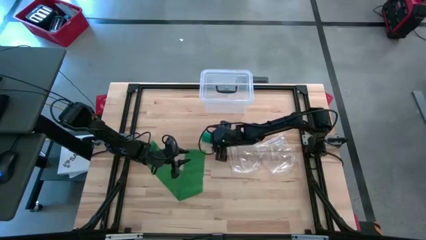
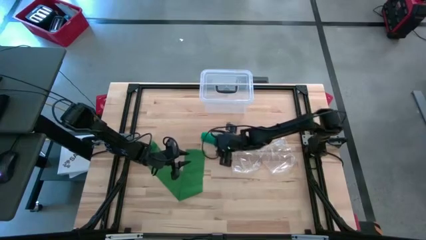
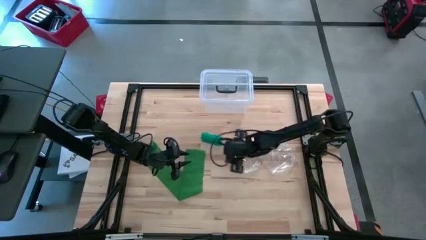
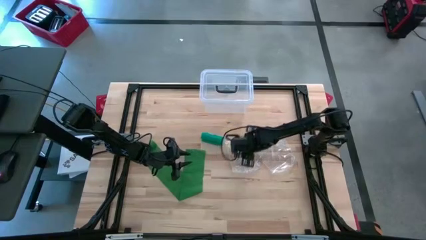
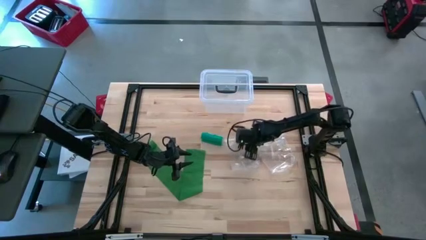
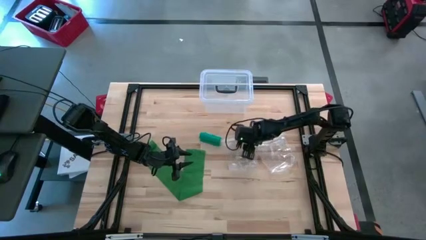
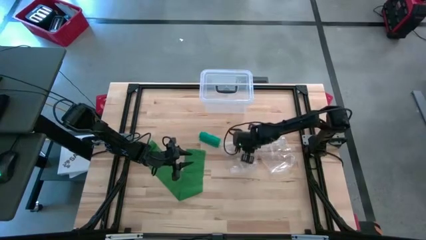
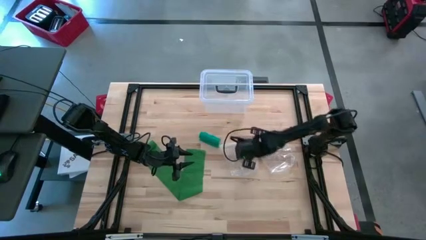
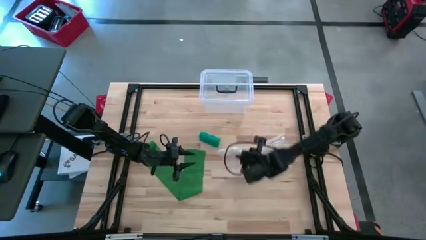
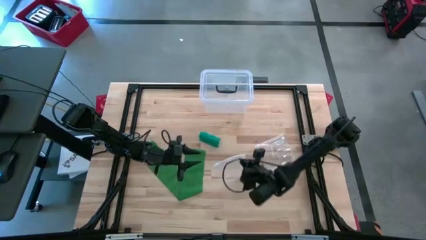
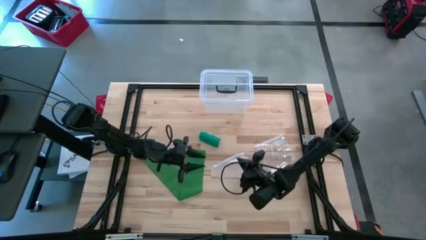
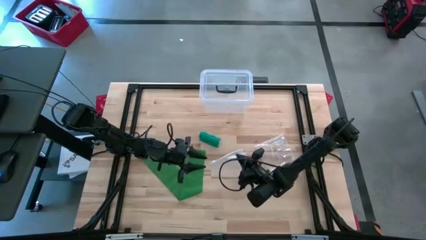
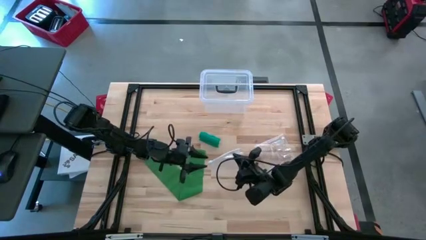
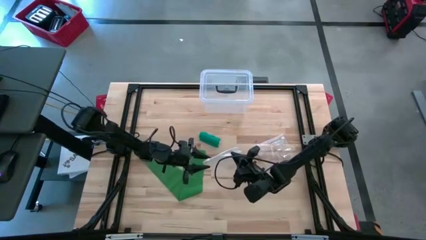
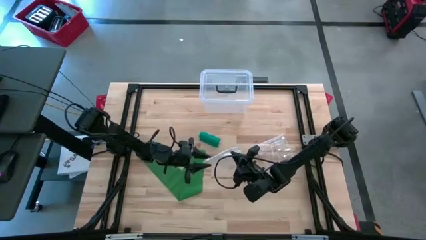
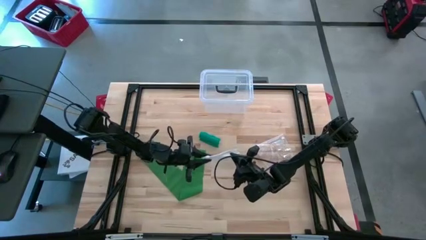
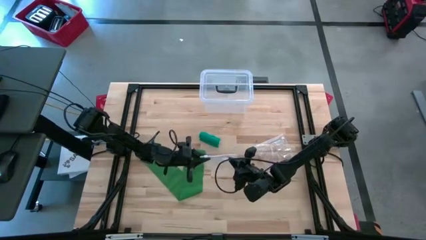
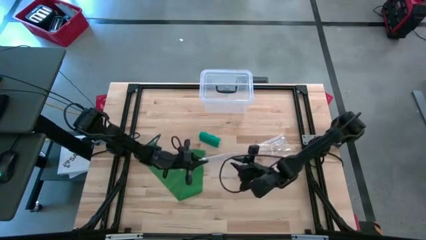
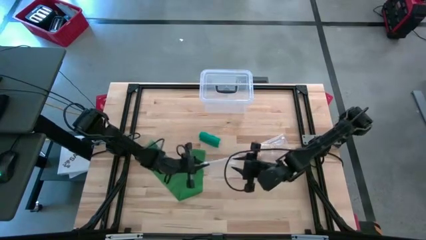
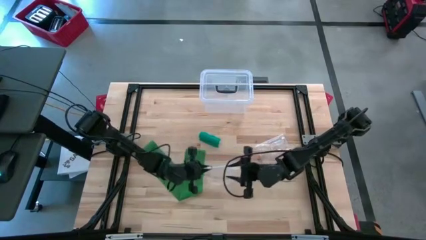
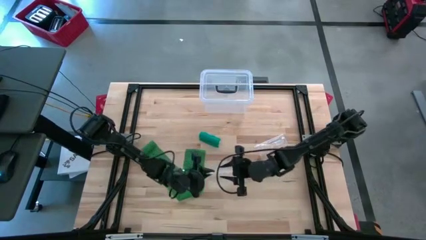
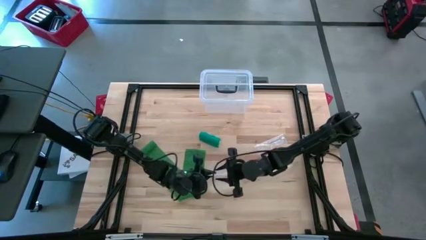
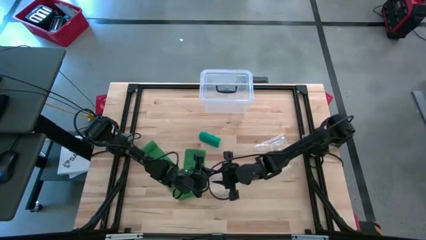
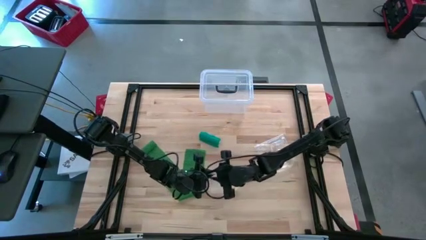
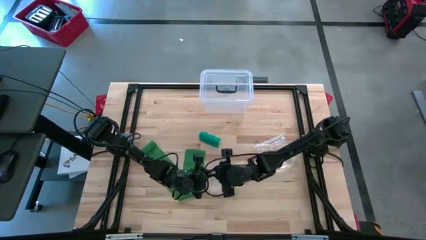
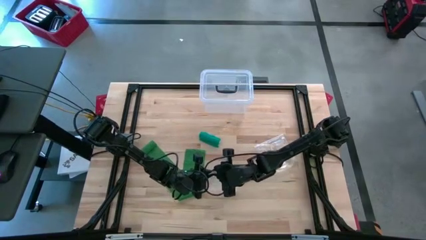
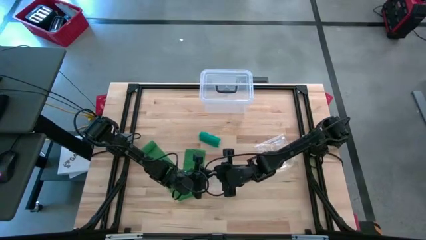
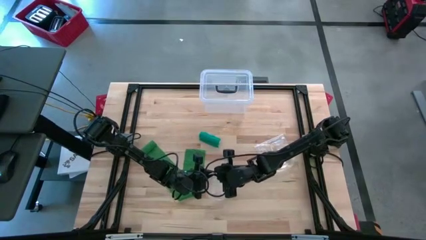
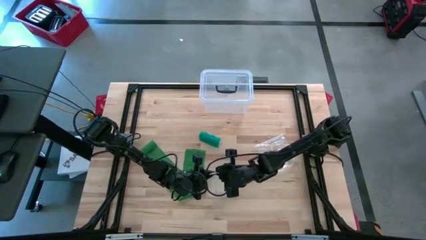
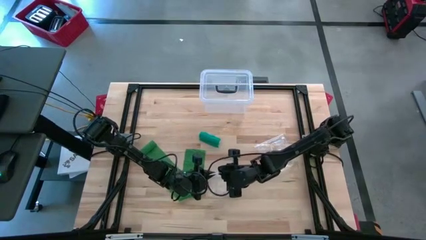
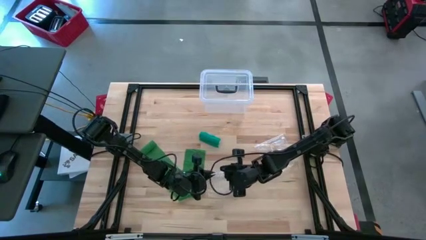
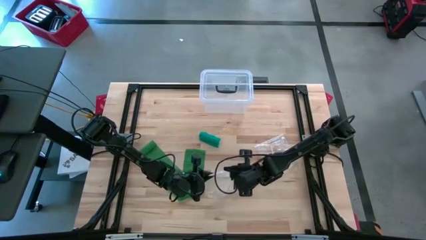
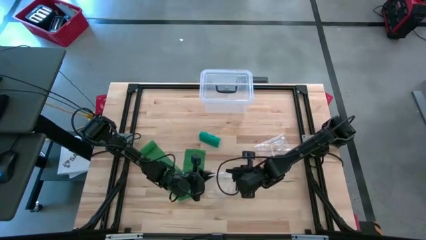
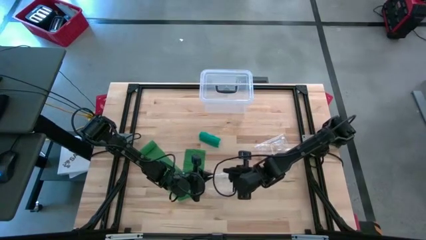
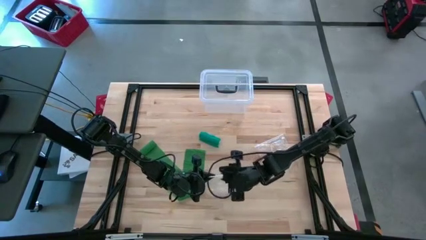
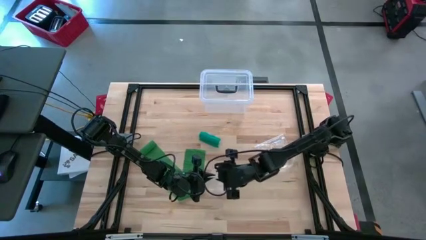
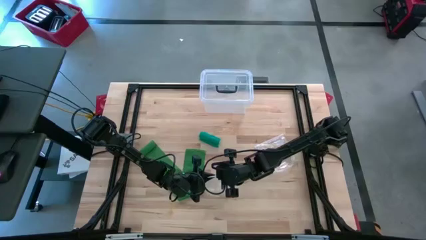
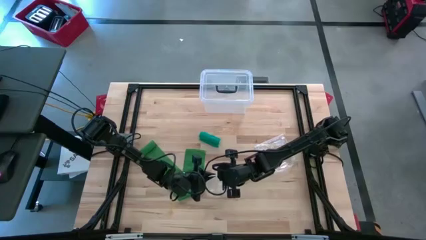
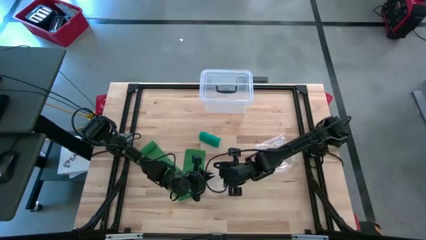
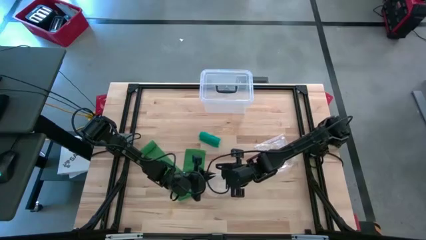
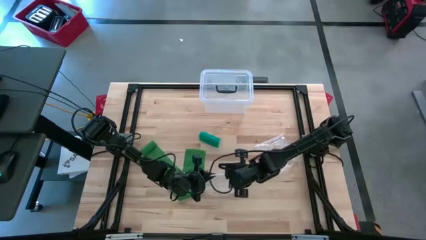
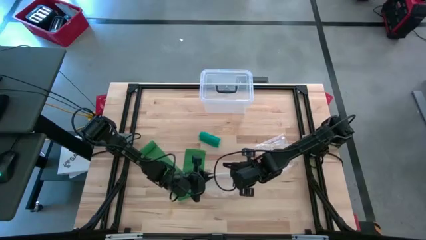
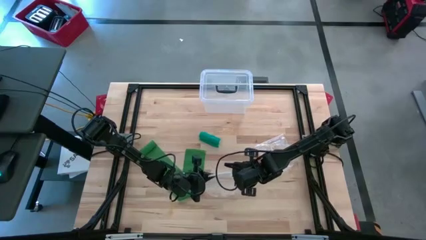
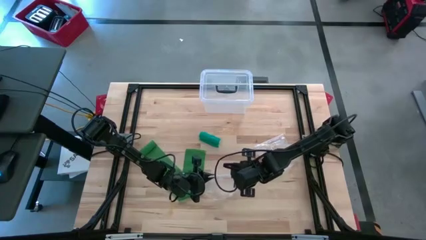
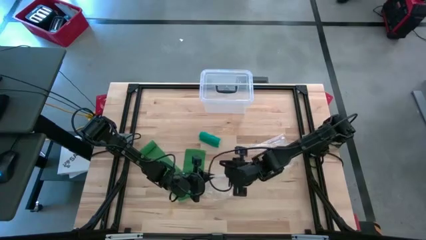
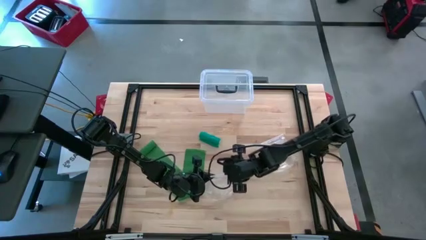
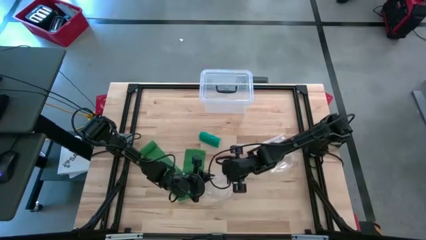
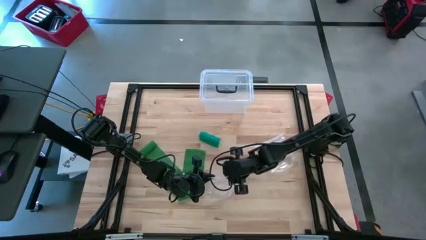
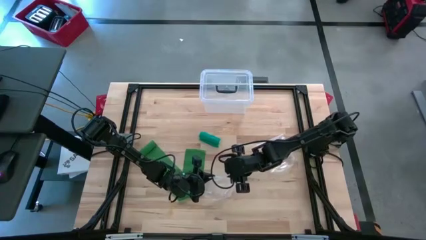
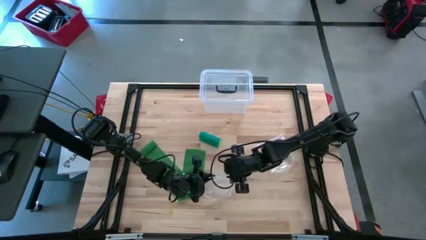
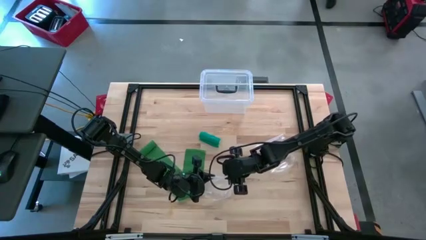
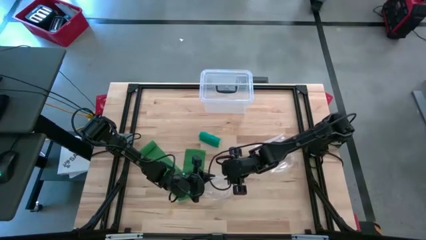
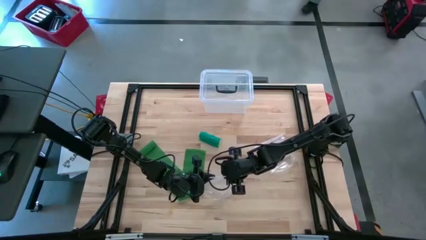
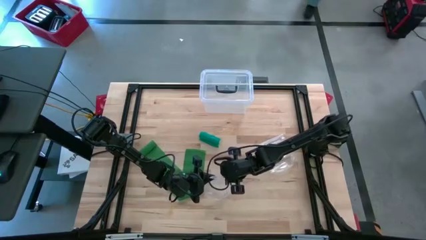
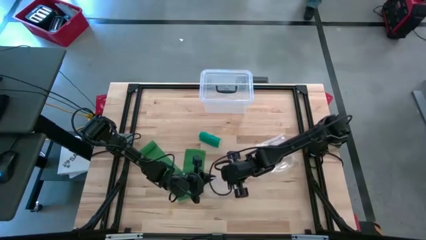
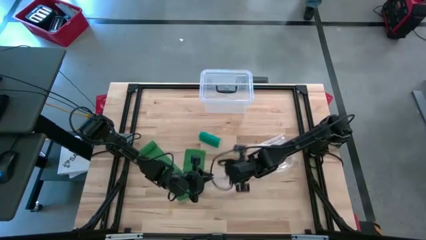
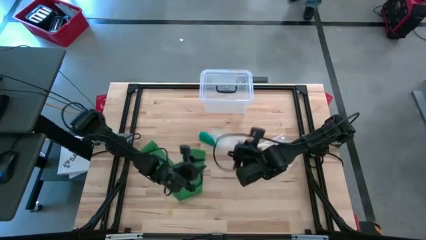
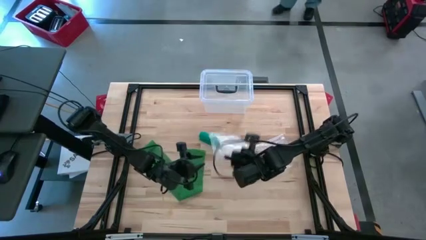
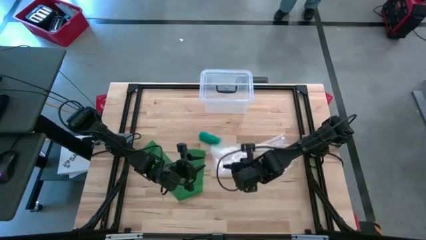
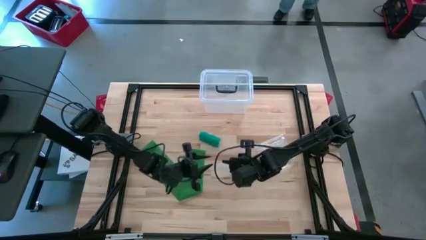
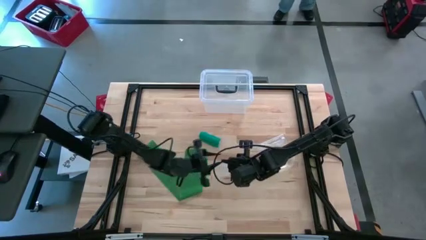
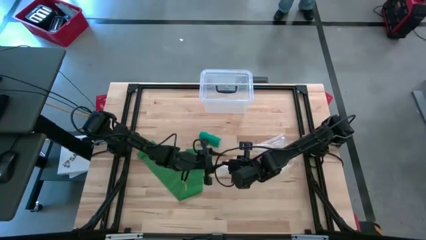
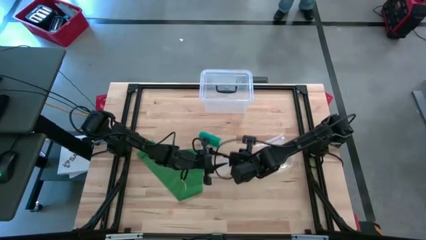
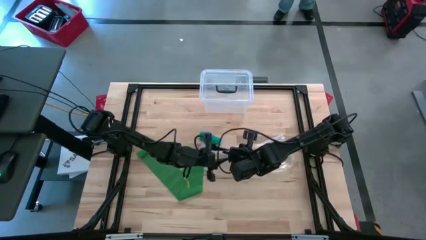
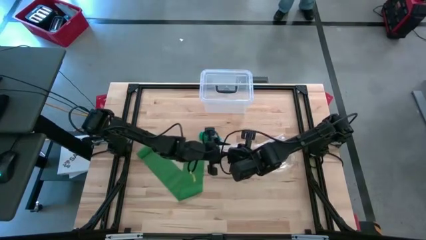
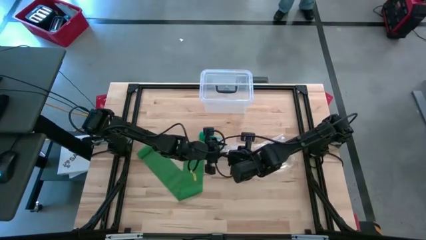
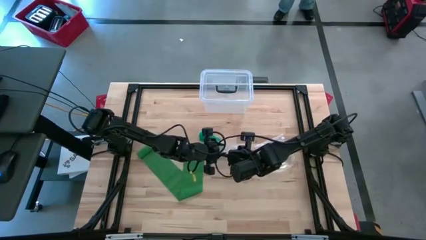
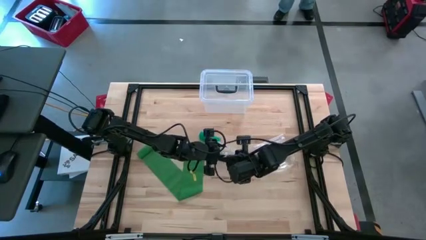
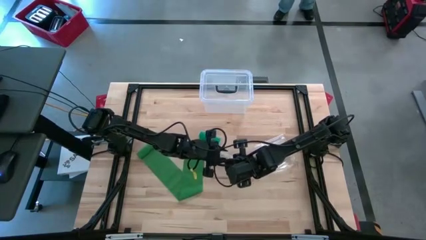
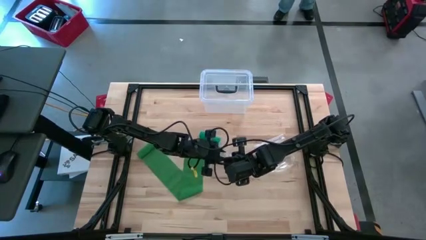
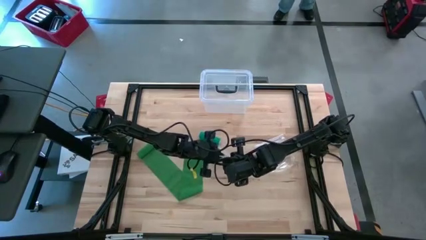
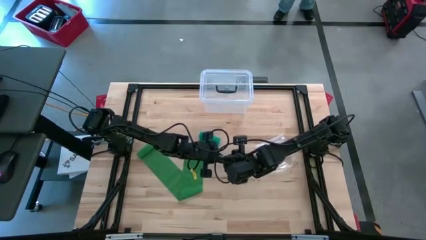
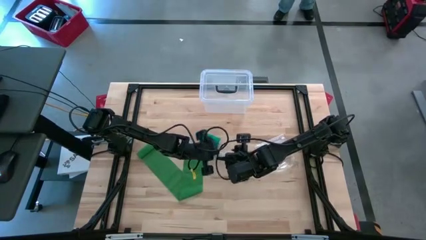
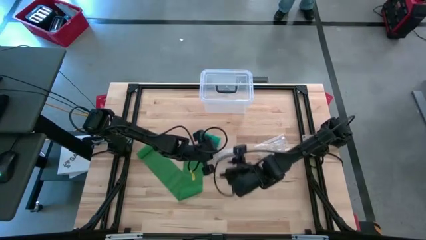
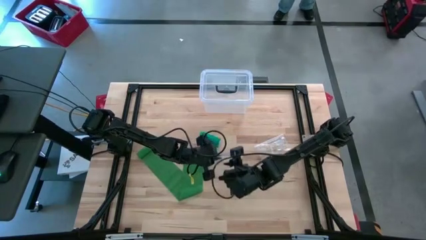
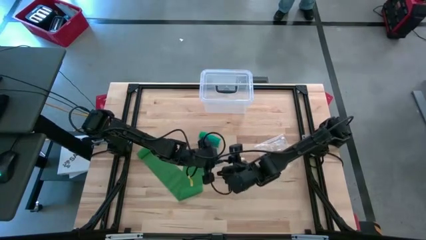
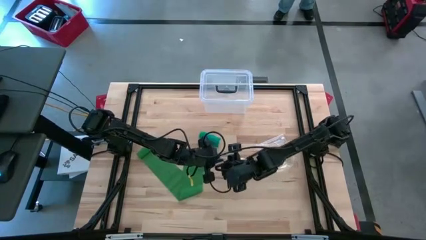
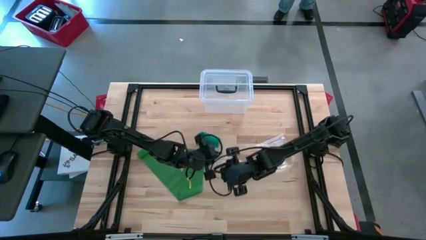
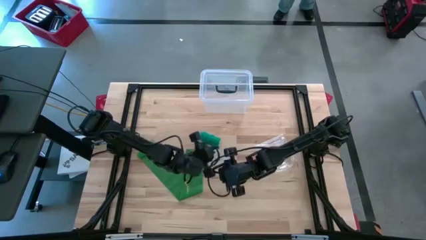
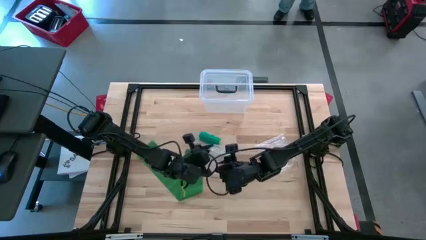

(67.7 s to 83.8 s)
Task: Roll bandage
Open the left transparent zip bag
